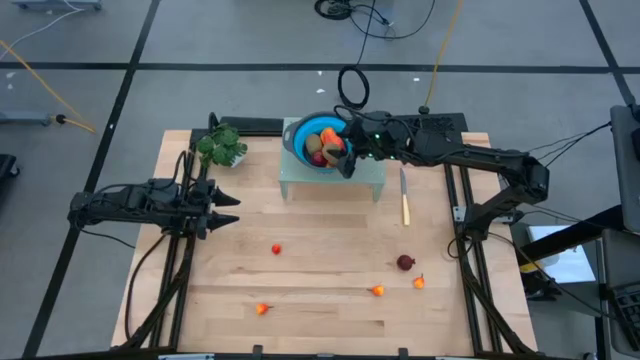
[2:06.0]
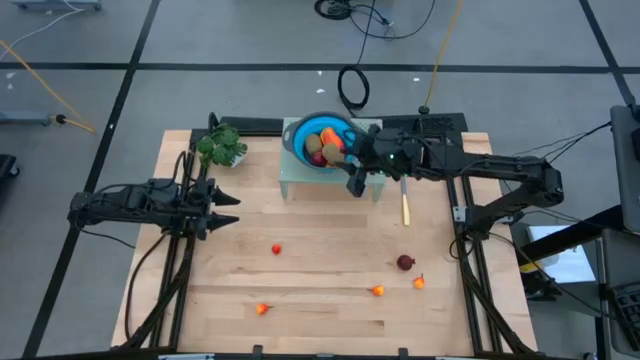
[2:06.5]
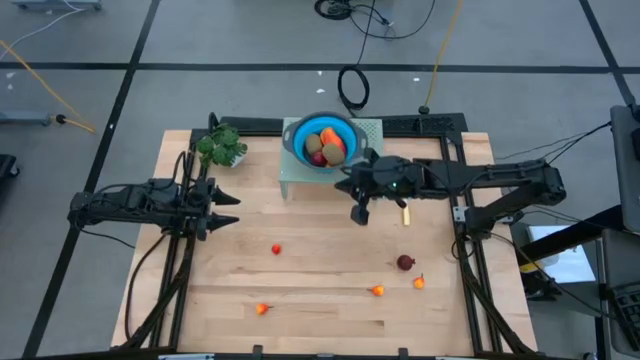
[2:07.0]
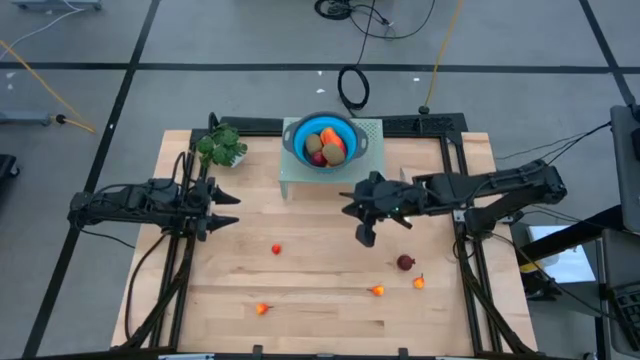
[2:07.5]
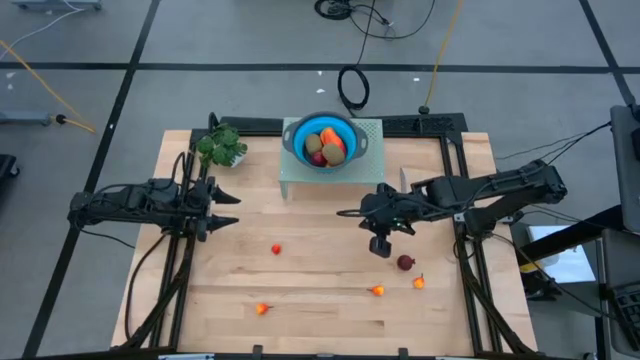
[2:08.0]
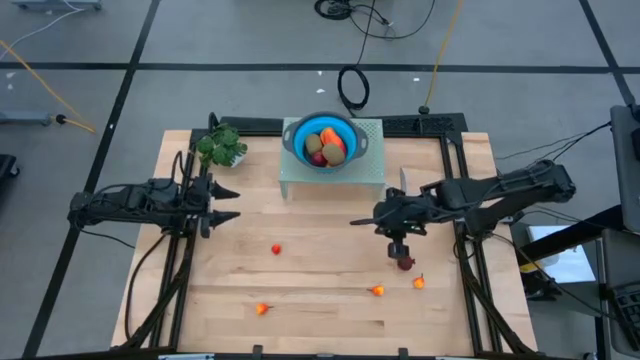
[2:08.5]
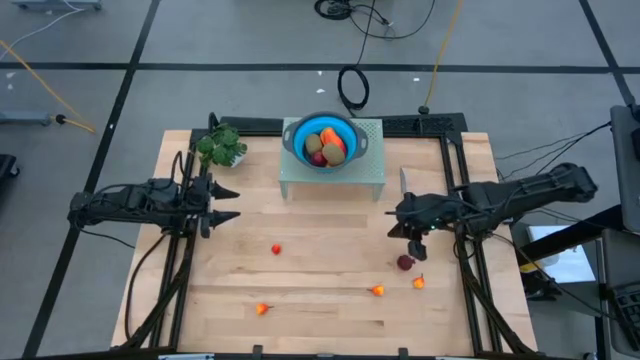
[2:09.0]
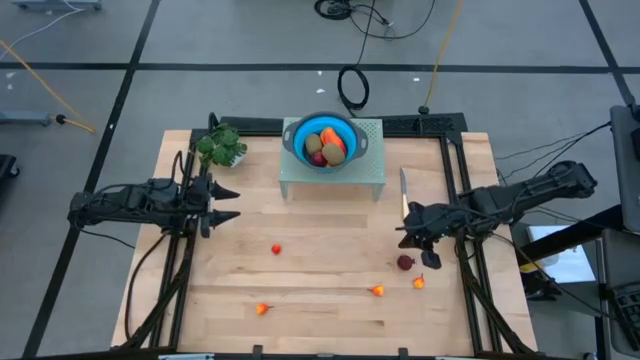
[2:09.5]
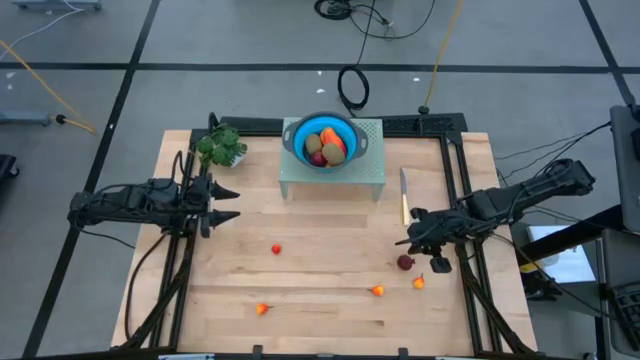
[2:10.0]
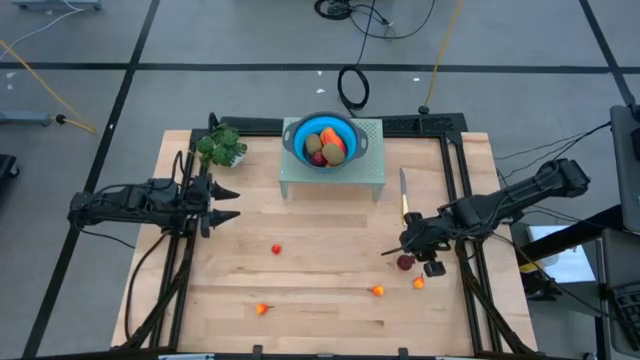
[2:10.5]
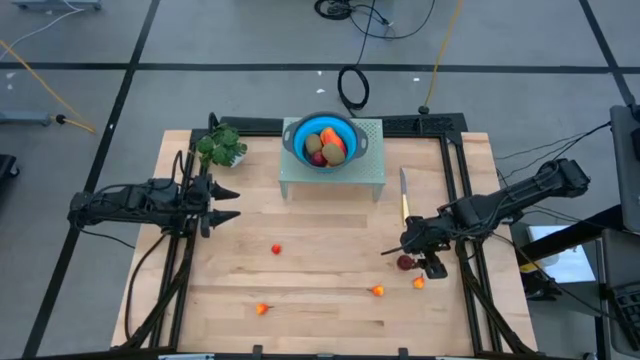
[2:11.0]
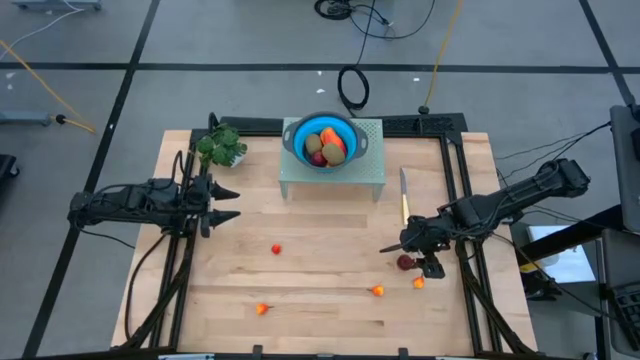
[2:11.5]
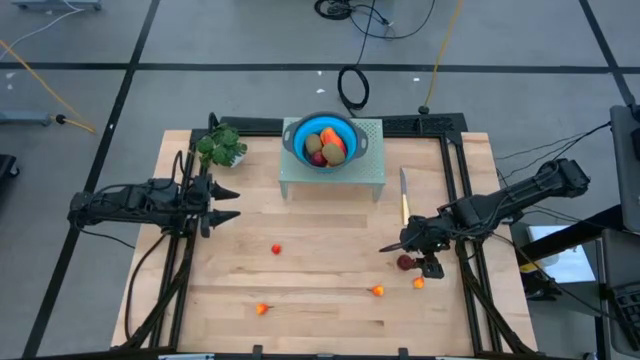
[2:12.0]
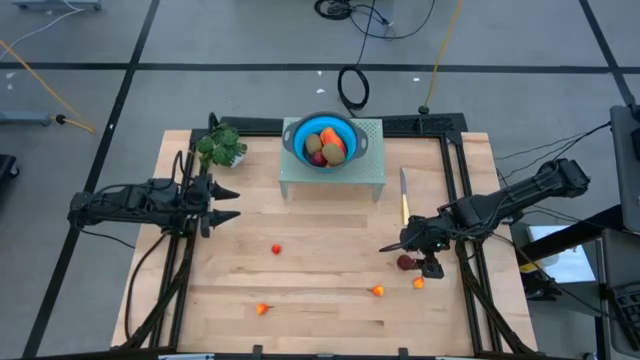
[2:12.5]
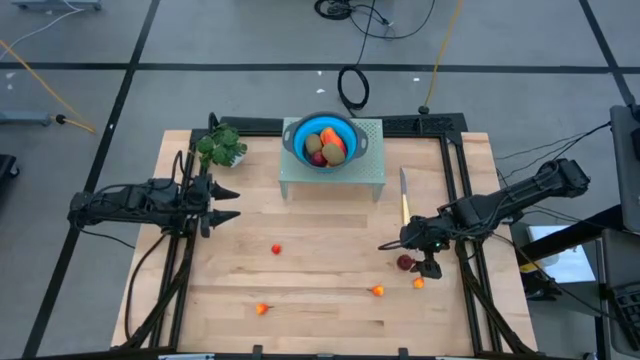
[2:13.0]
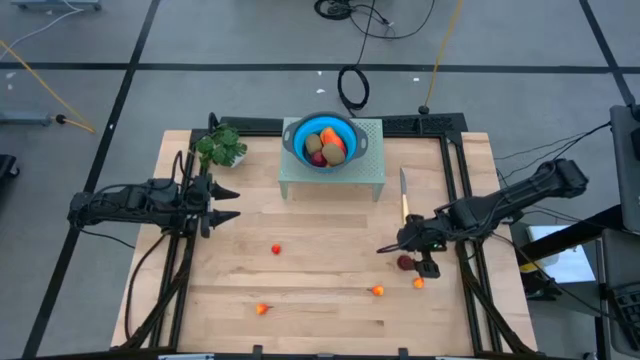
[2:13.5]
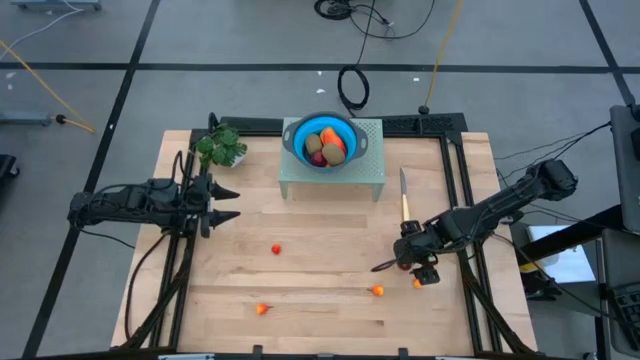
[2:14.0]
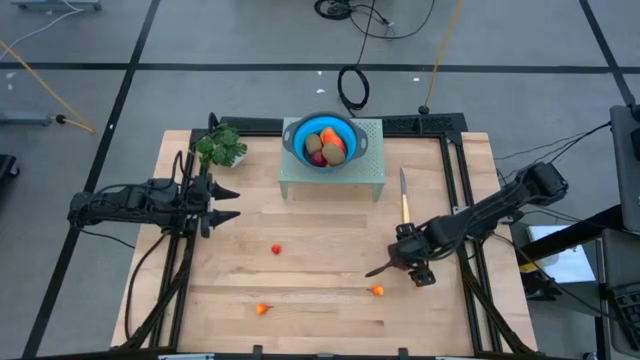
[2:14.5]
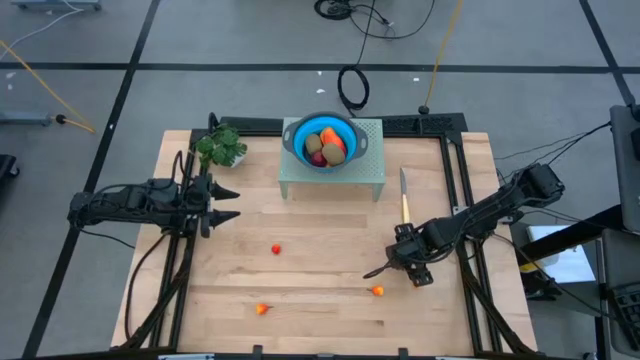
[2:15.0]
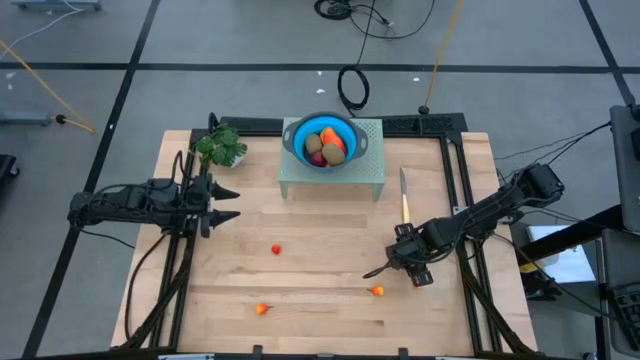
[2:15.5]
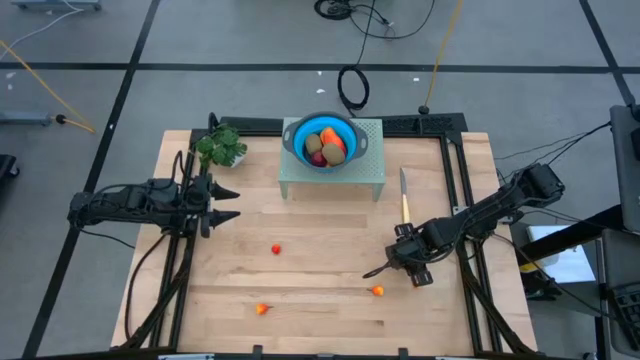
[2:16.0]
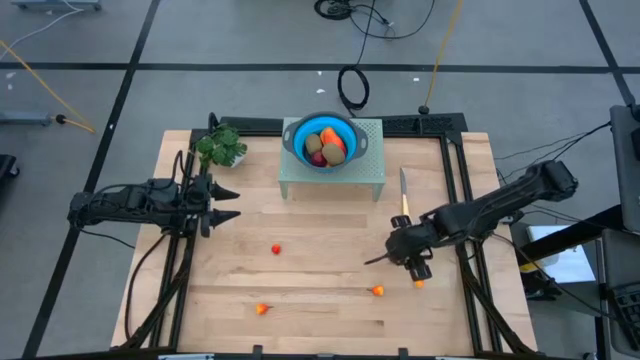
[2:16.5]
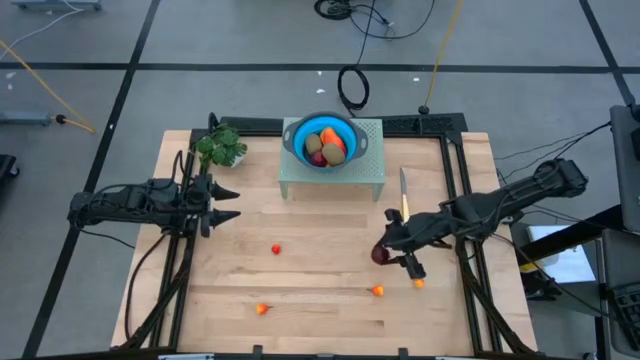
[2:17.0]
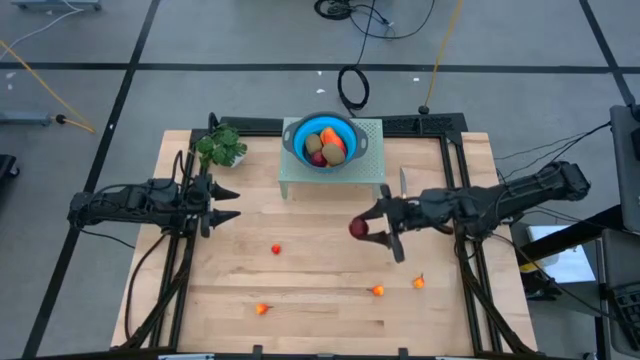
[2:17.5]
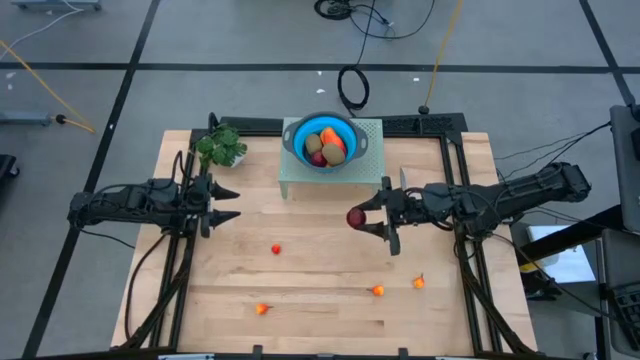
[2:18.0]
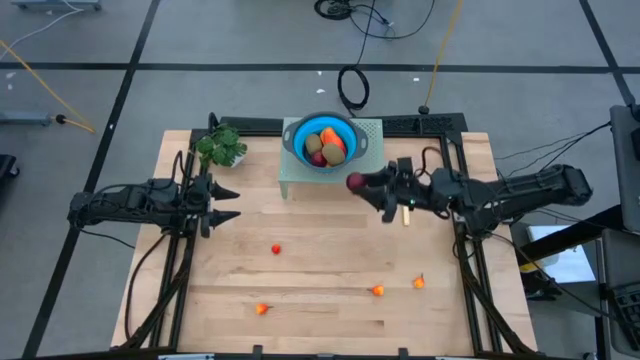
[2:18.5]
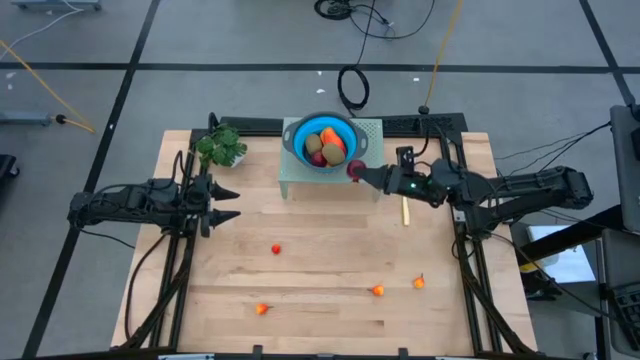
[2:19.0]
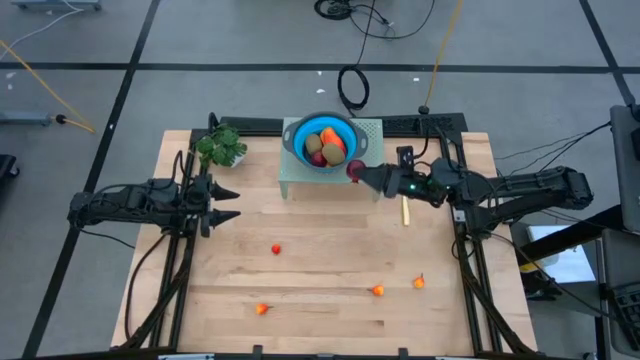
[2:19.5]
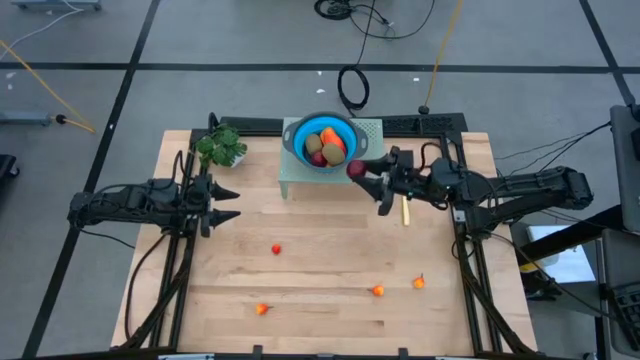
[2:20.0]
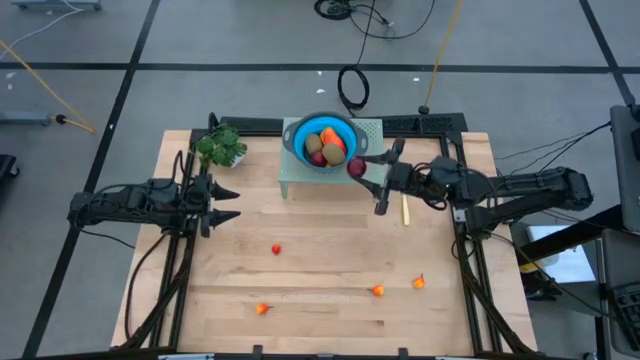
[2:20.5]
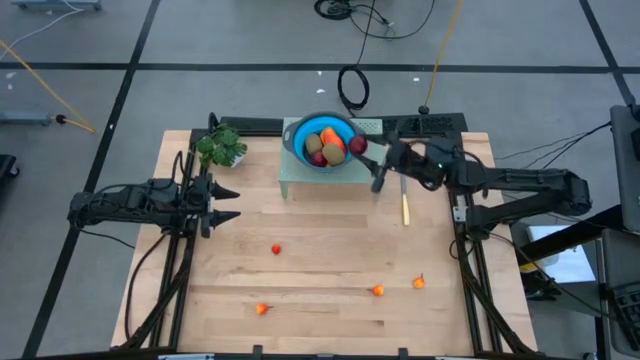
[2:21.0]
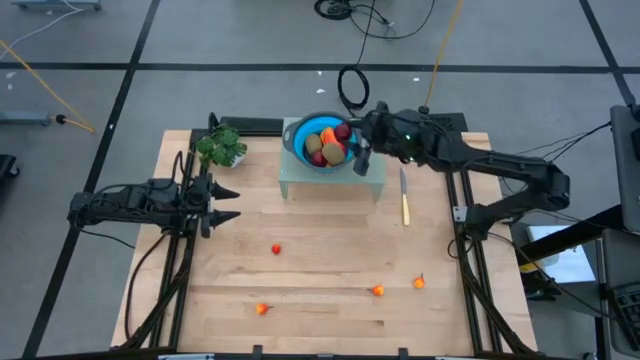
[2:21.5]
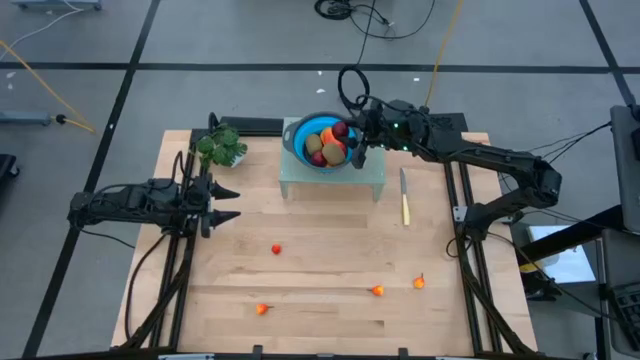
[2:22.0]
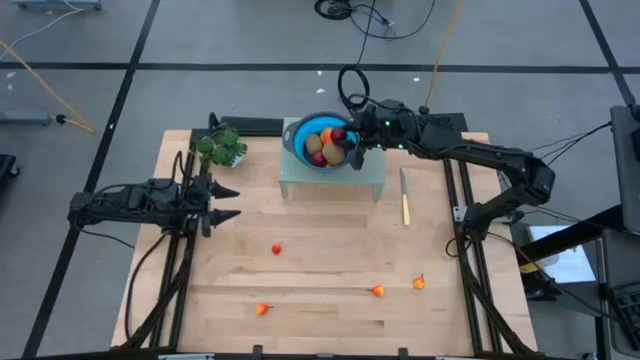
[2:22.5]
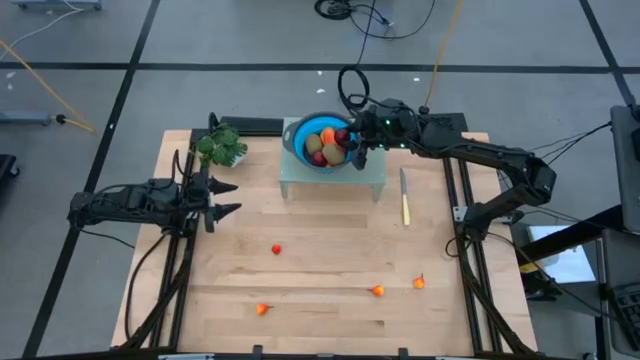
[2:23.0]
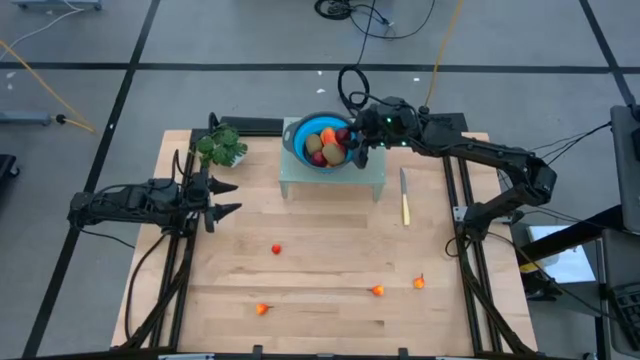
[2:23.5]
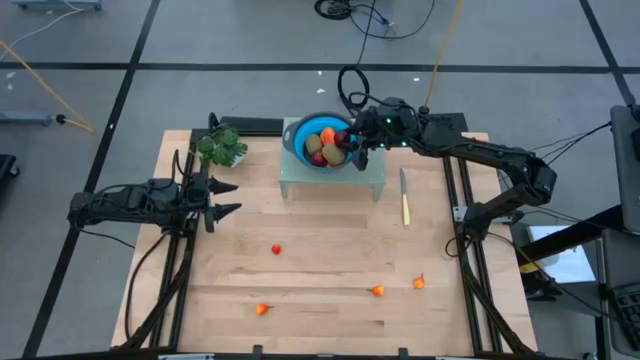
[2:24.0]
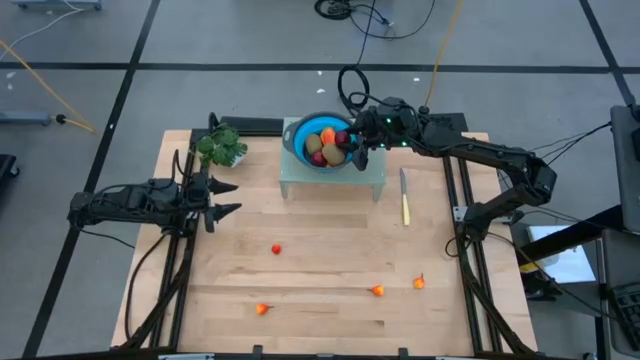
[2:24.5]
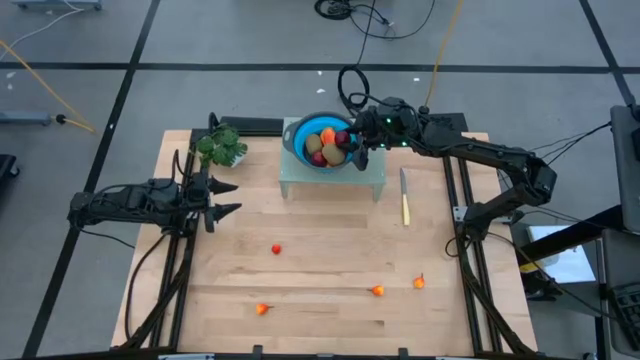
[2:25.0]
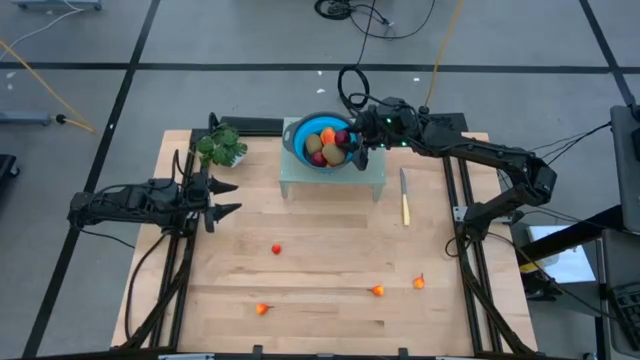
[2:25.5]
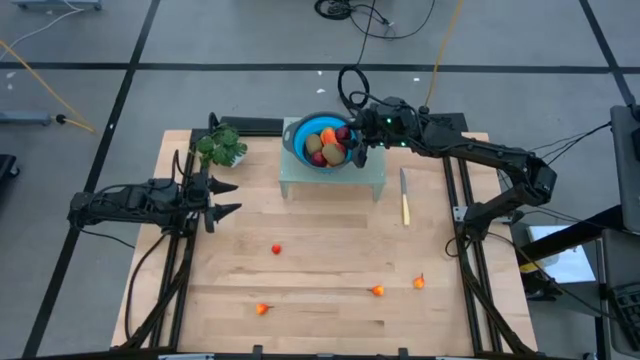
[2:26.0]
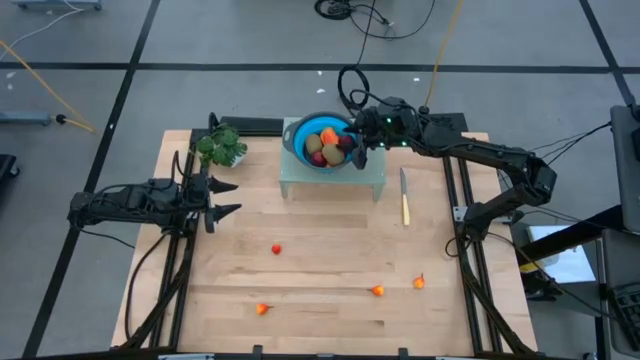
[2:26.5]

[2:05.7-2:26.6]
Task: Pick & Place Fruit
Put the pomegranate into the colander on the shelf
